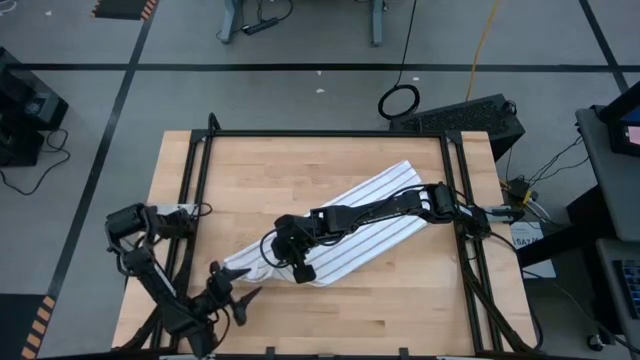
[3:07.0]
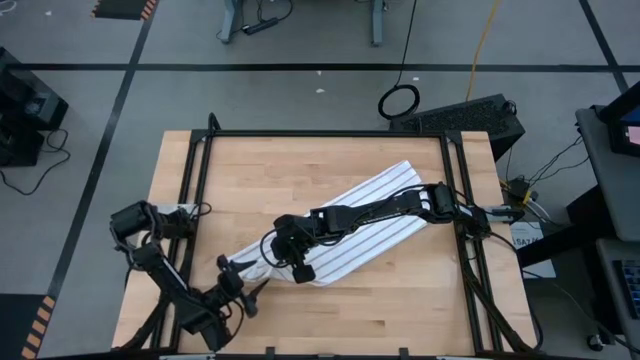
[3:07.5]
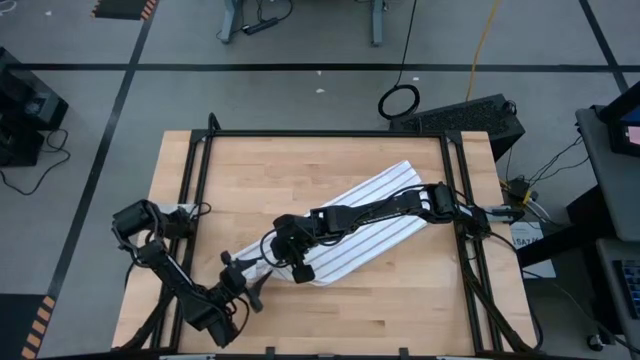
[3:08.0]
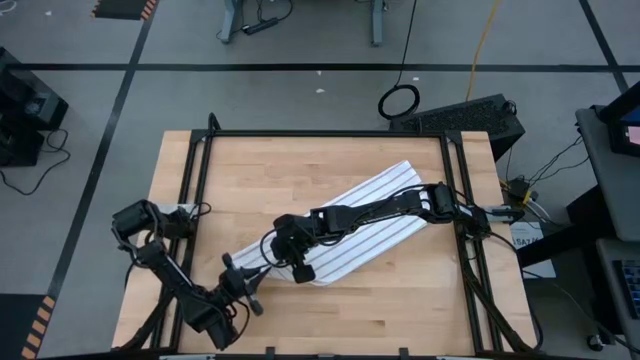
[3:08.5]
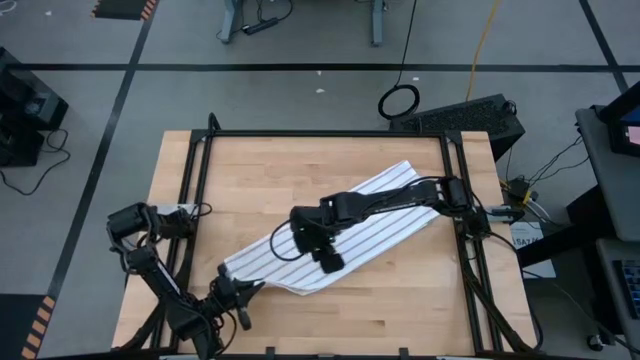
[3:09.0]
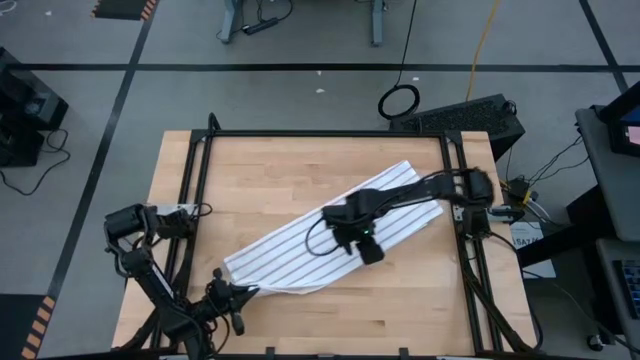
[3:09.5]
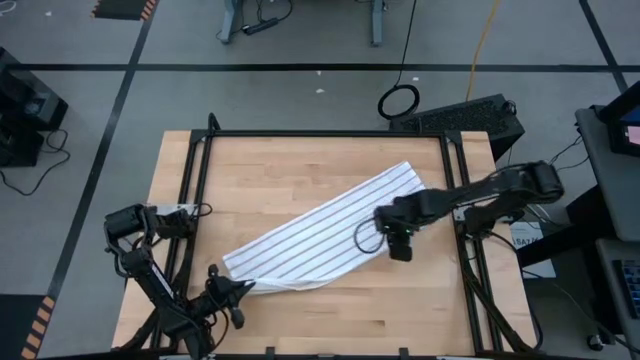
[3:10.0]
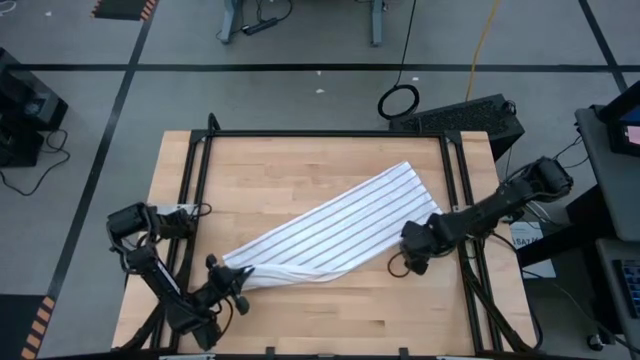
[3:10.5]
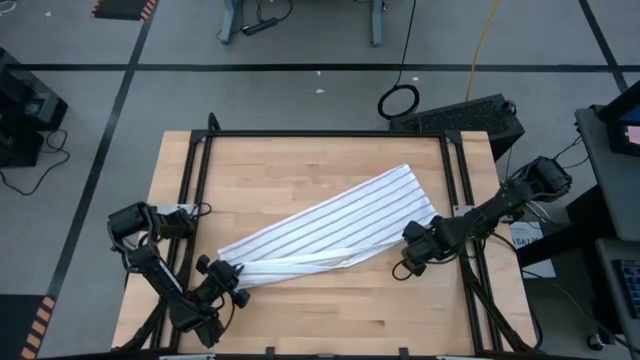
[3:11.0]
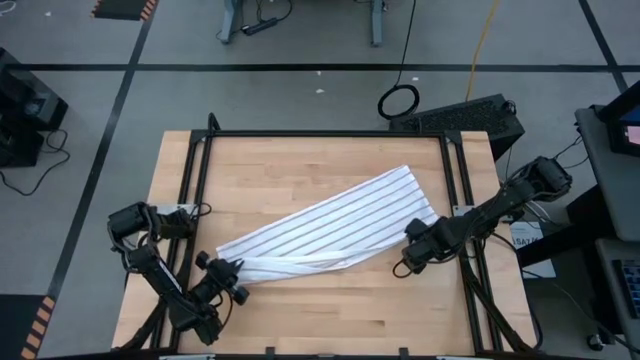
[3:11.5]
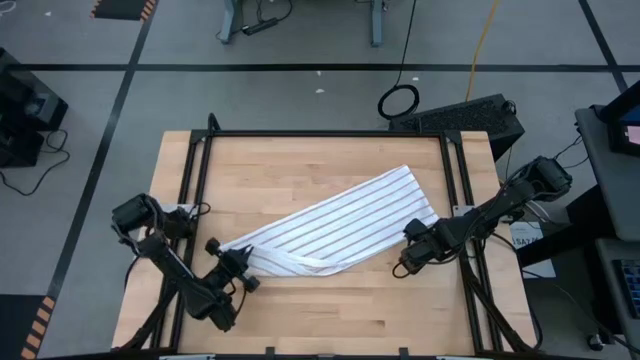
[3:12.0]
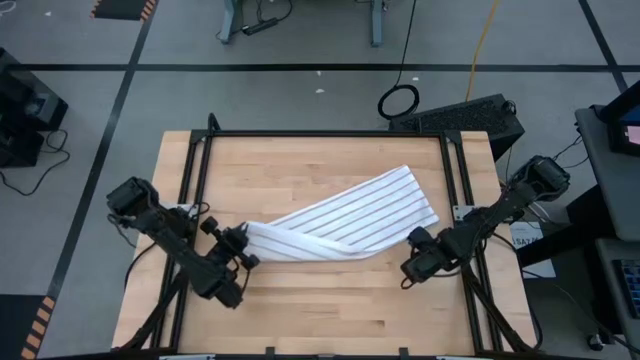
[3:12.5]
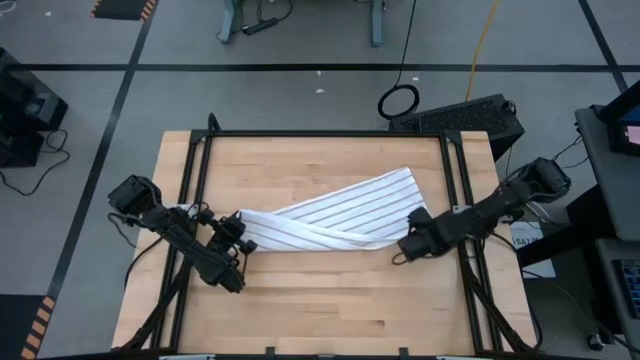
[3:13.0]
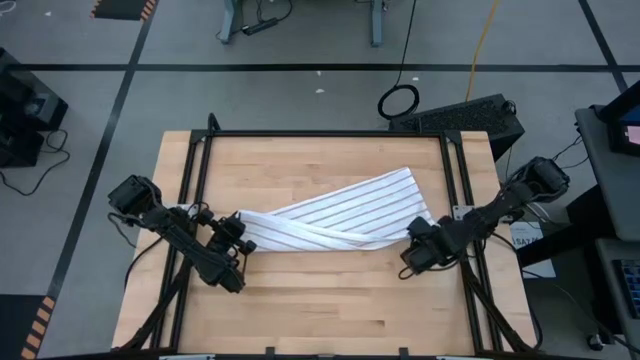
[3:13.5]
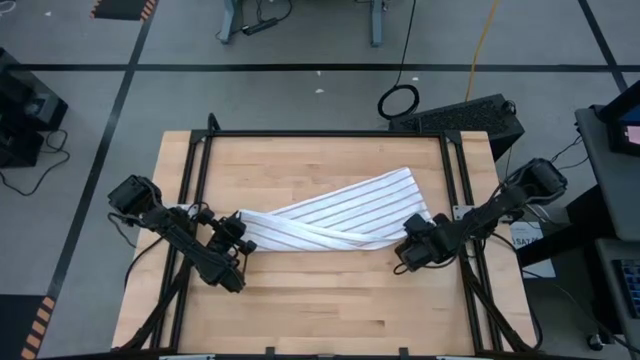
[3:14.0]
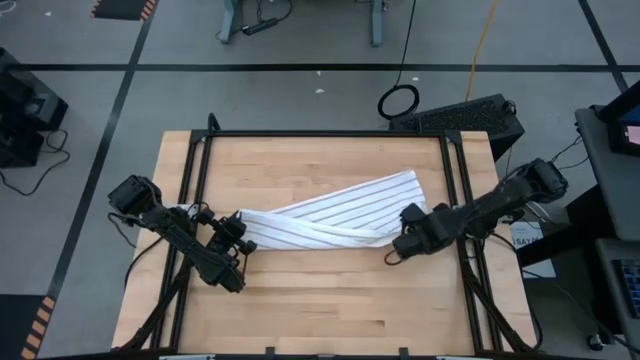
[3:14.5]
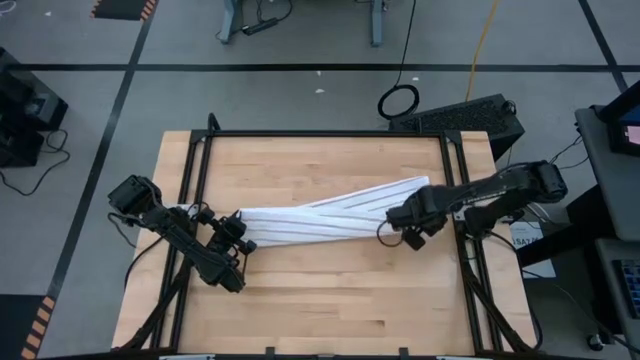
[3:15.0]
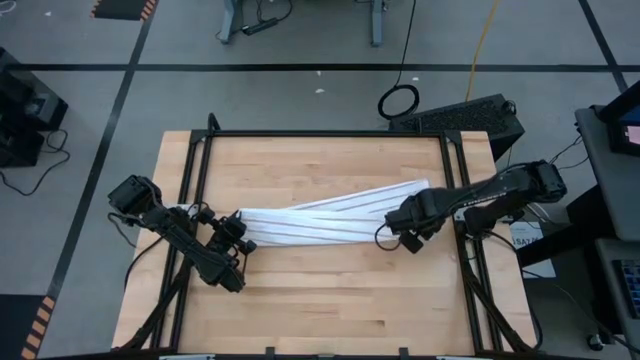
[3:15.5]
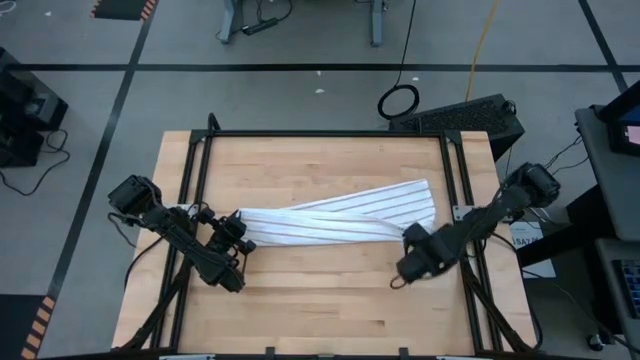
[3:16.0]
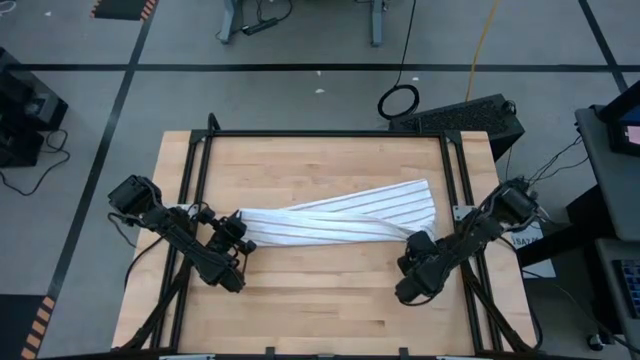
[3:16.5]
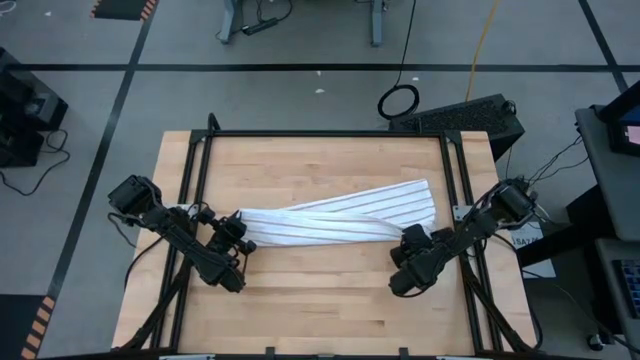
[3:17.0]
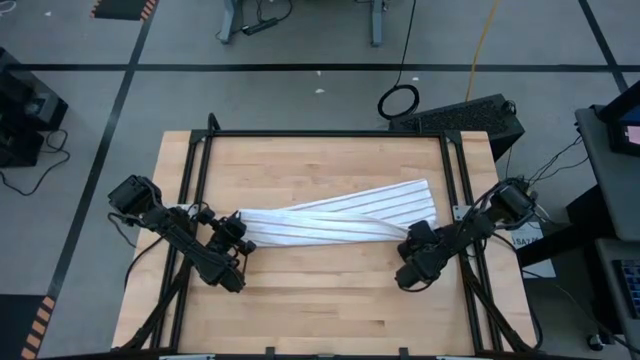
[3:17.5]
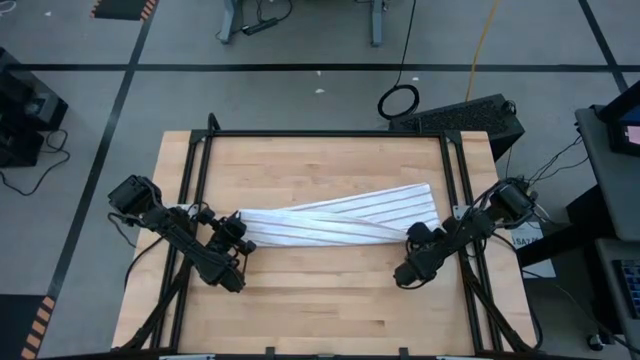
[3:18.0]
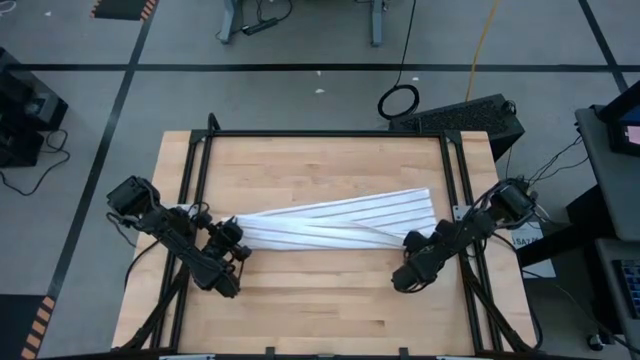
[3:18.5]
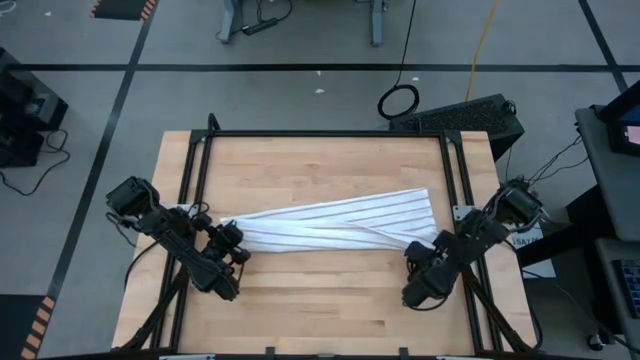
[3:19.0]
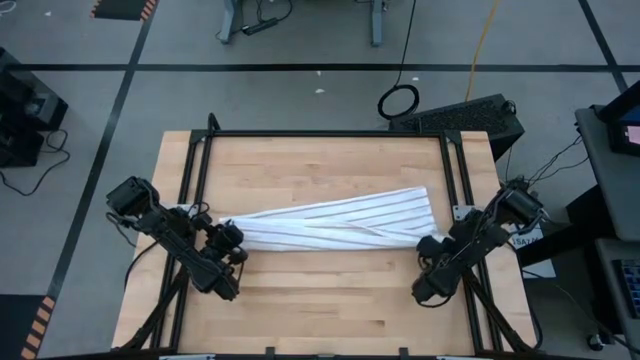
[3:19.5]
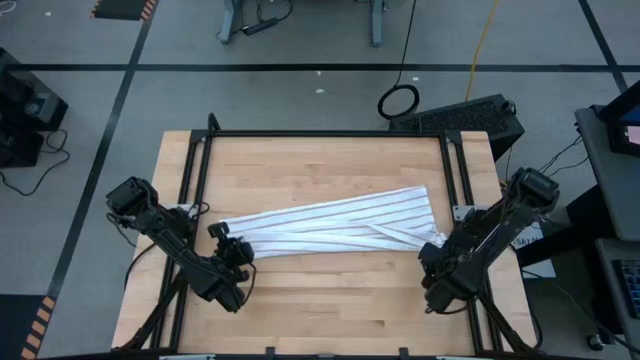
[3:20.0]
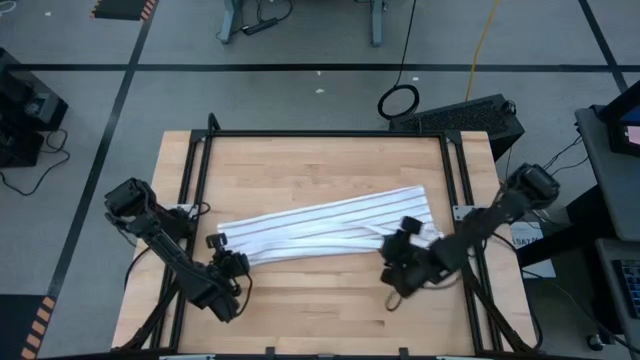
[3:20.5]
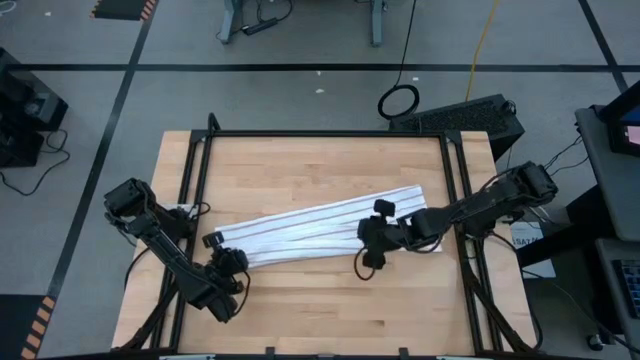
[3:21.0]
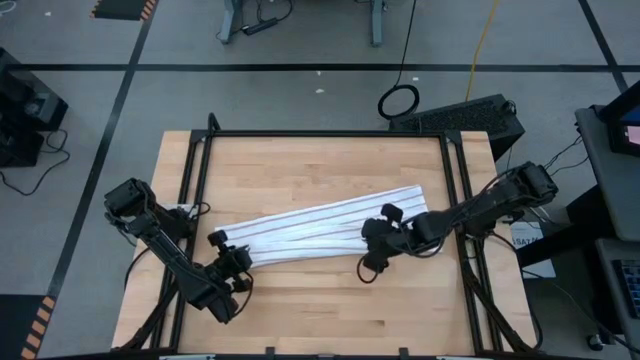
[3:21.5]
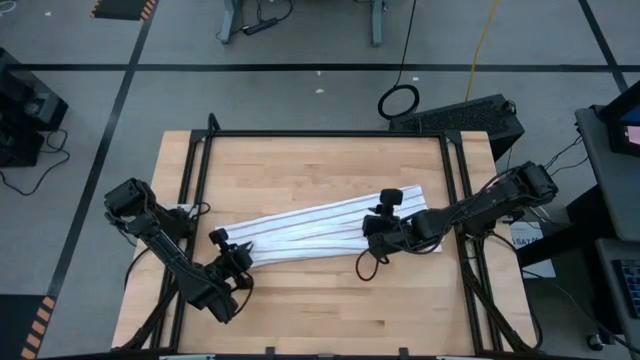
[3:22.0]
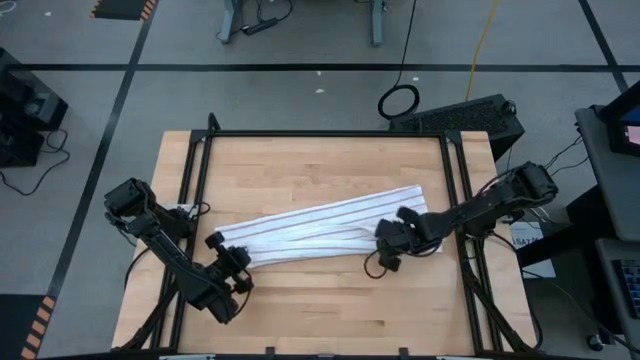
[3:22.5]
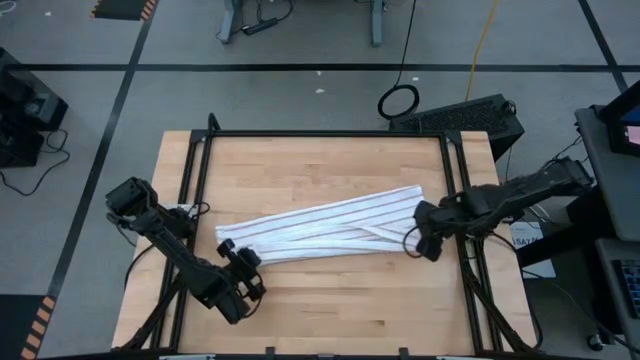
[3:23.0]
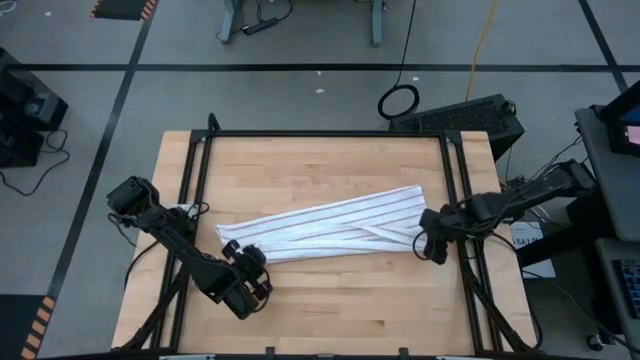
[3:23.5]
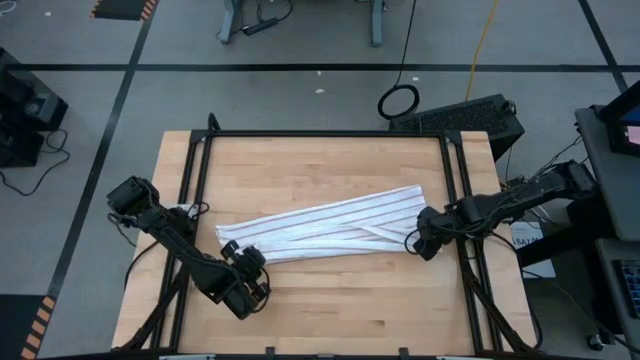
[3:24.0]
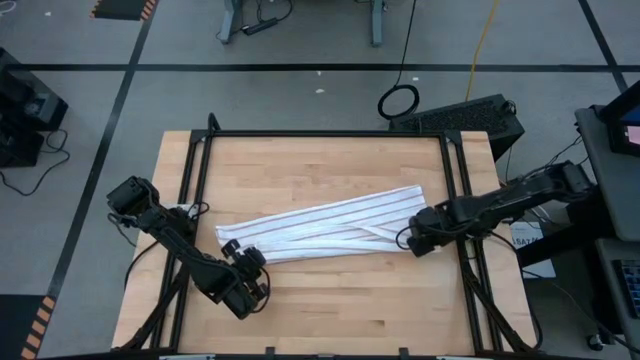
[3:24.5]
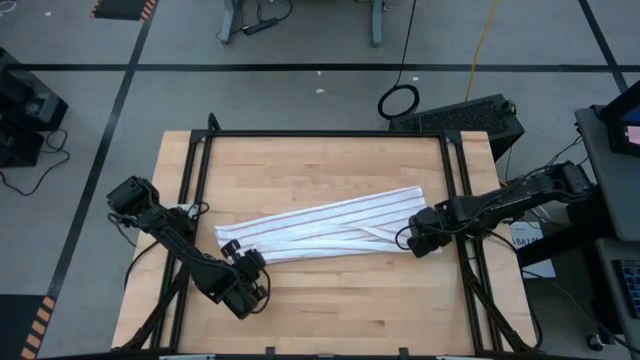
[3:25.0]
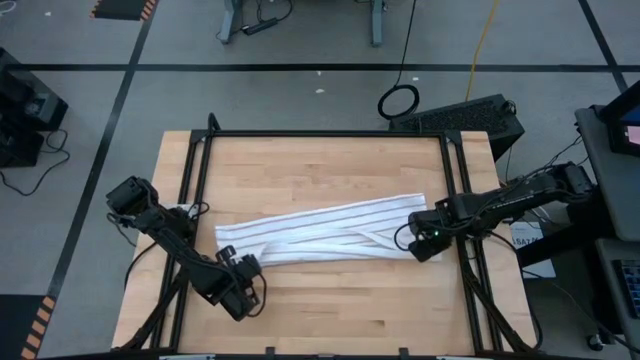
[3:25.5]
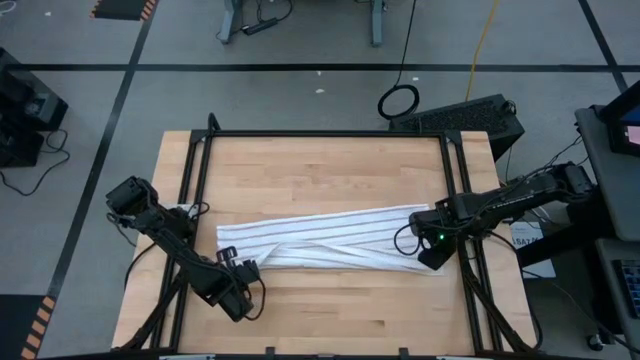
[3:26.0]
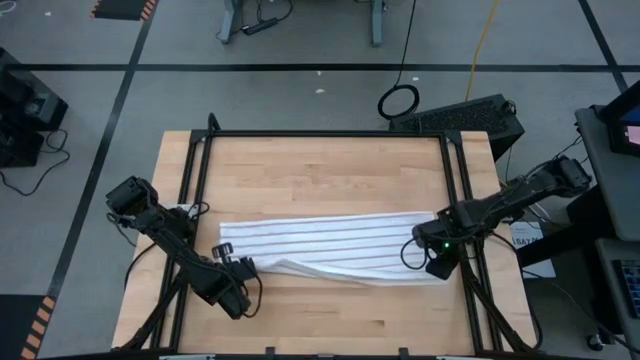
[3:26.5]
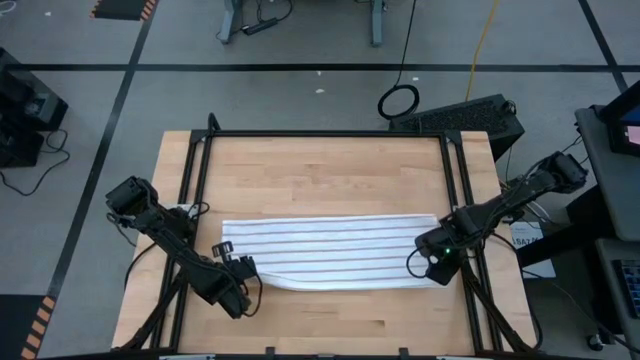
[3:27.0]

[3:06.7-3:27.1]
Task: Roll towel into tight, uniform cylinder
Fold the white brown kitchen towel

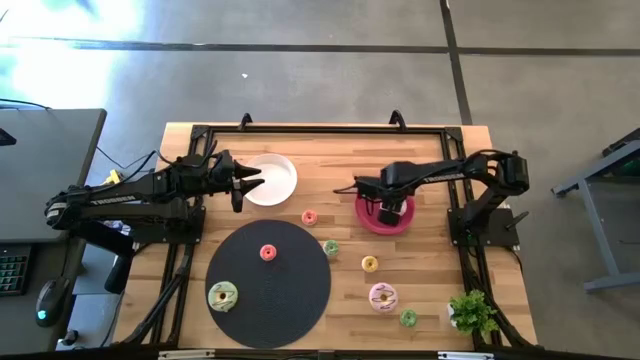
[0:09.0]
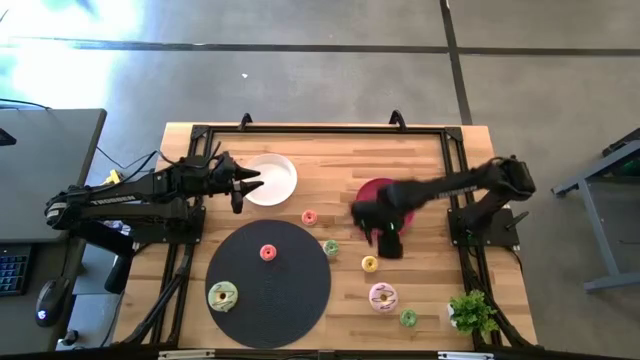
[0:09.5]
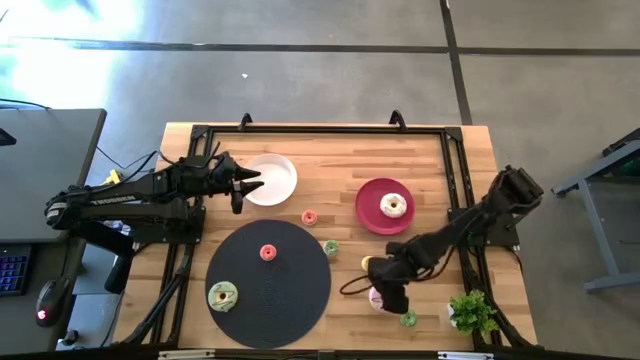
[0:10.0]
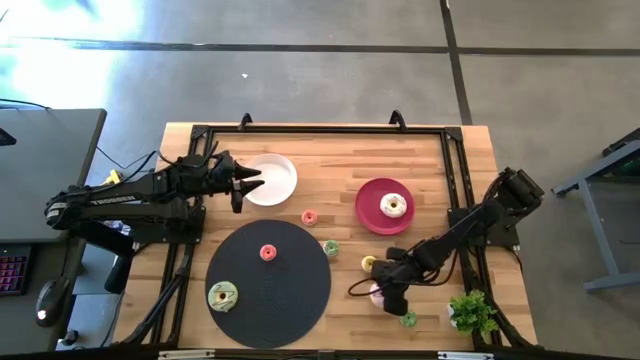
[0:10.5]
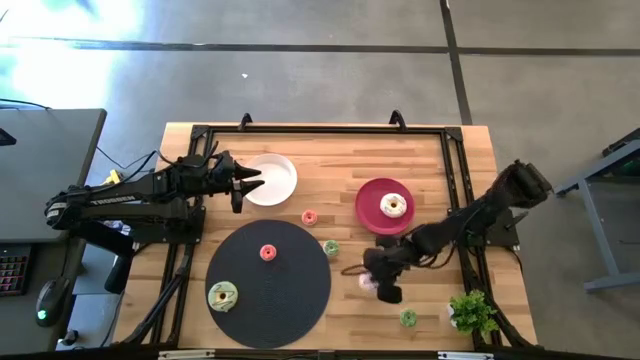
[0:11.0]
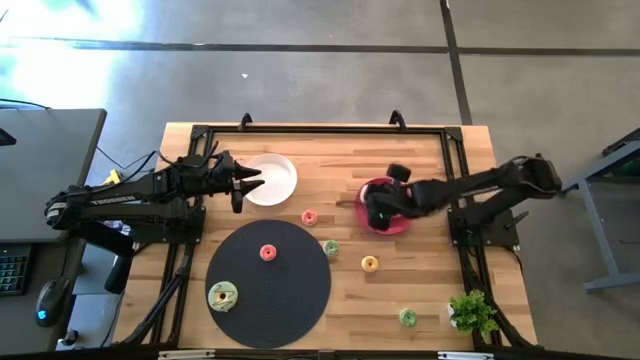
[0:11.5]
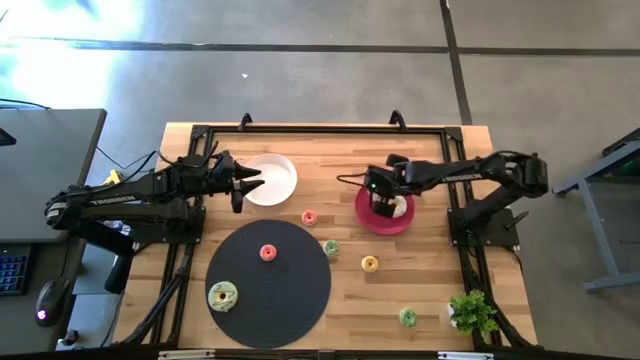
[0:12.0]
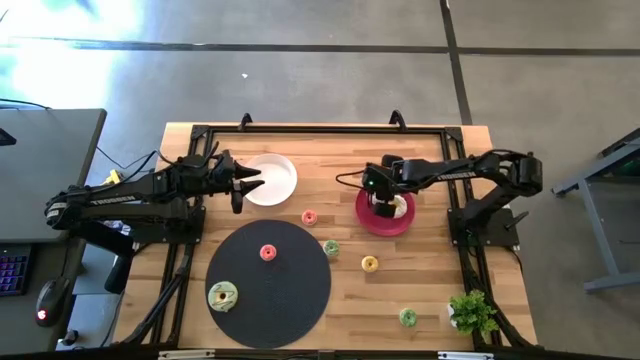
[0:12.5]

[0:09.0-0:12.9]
Task: Pick & Place donuts
Put the large purple donut on the pink plate
